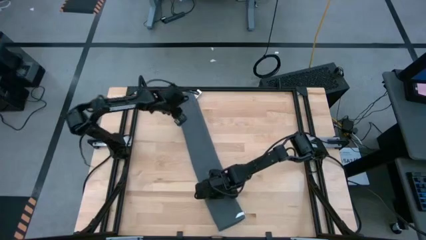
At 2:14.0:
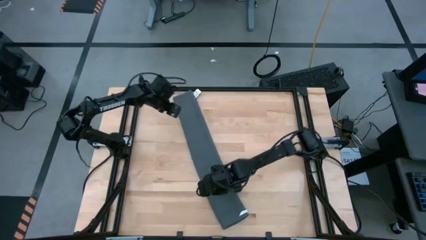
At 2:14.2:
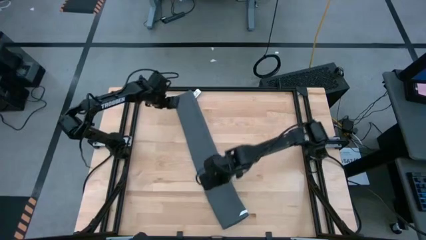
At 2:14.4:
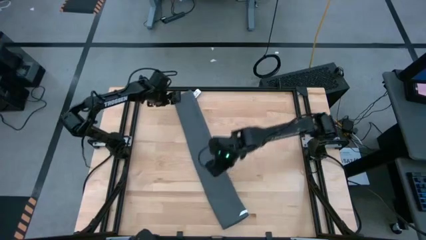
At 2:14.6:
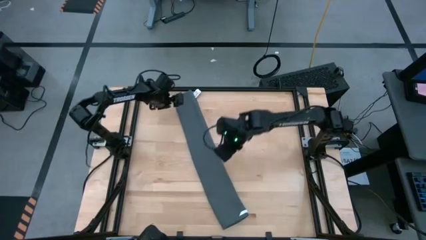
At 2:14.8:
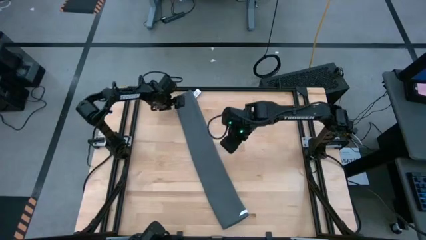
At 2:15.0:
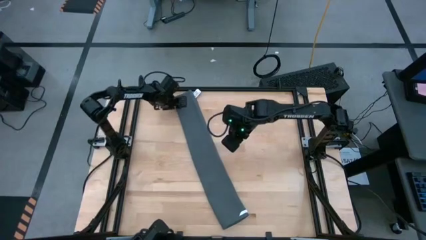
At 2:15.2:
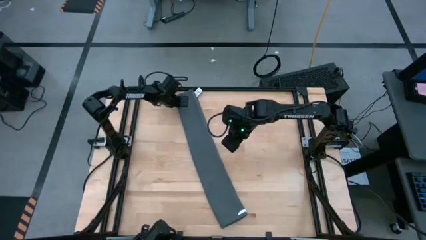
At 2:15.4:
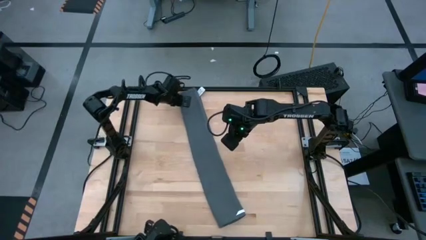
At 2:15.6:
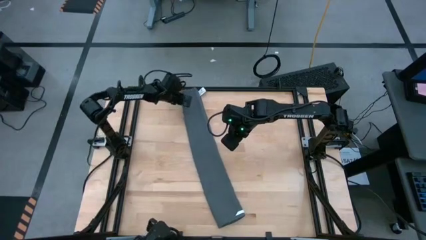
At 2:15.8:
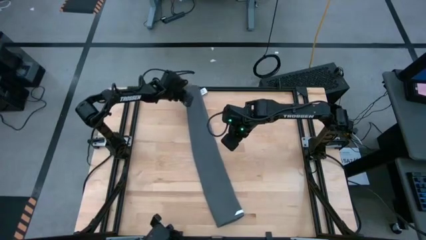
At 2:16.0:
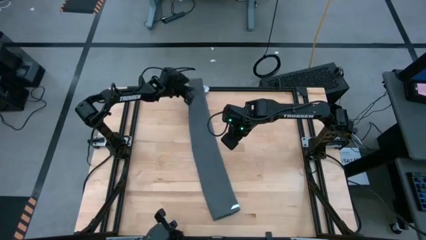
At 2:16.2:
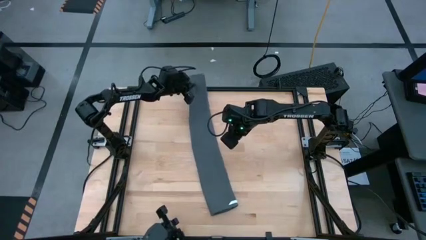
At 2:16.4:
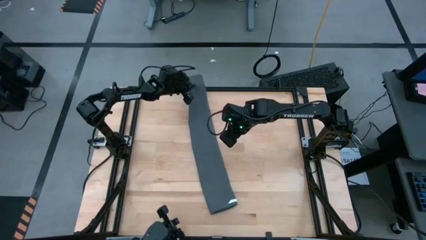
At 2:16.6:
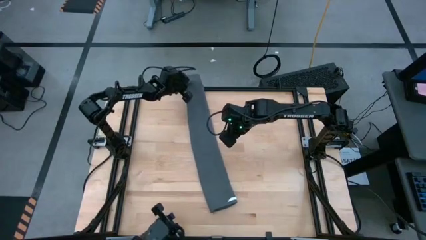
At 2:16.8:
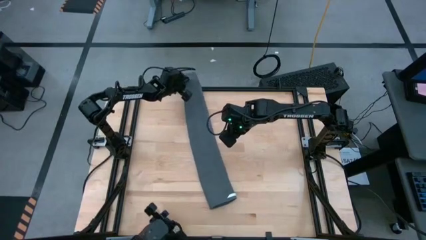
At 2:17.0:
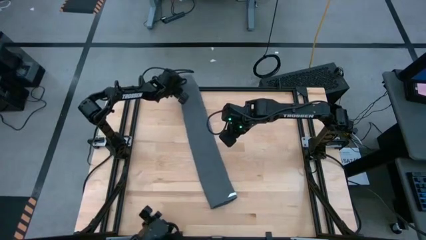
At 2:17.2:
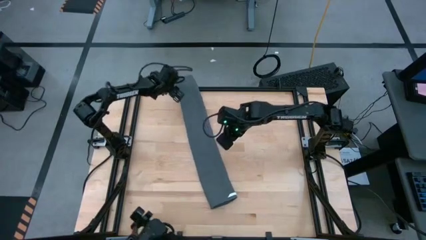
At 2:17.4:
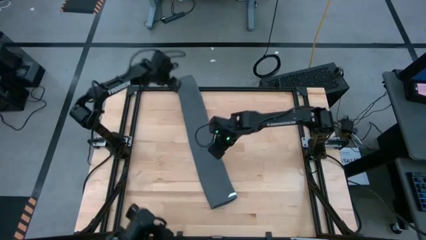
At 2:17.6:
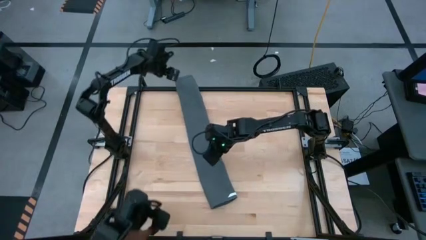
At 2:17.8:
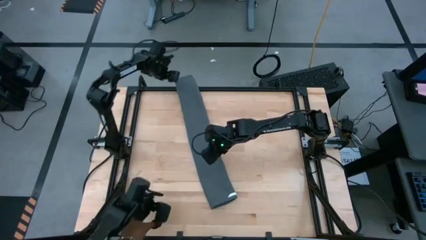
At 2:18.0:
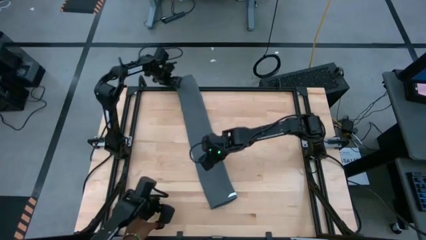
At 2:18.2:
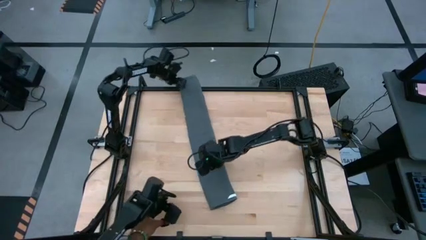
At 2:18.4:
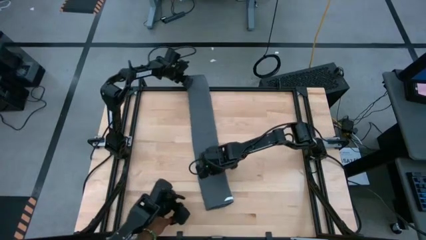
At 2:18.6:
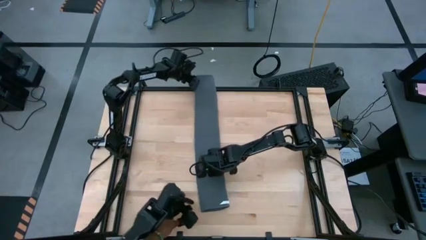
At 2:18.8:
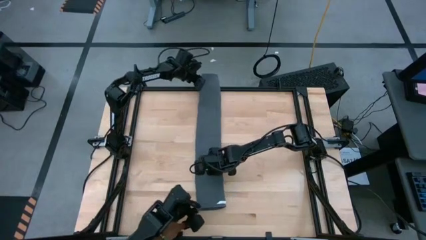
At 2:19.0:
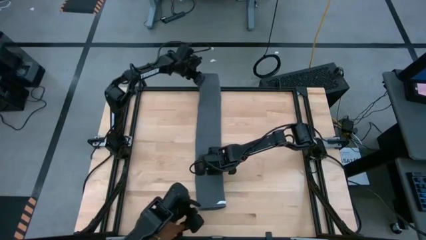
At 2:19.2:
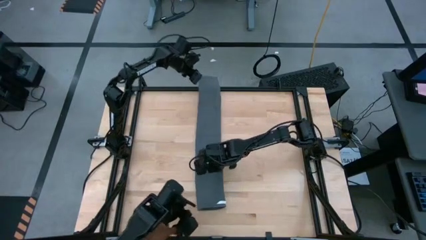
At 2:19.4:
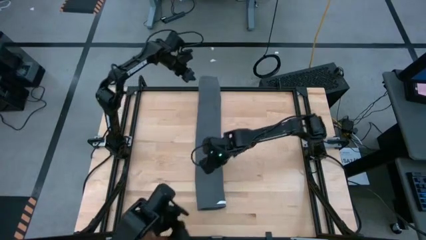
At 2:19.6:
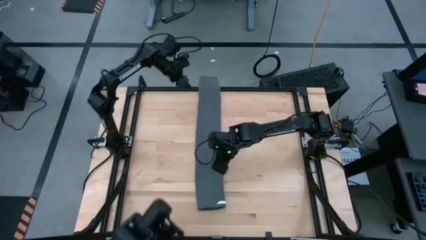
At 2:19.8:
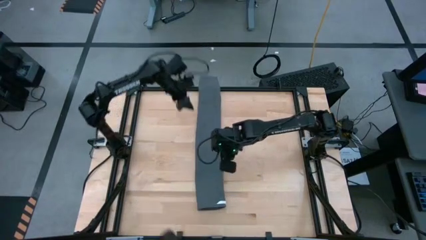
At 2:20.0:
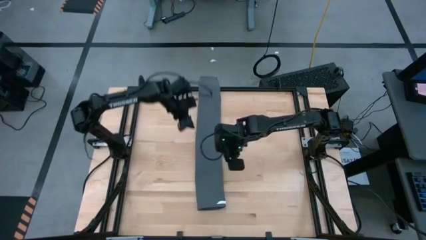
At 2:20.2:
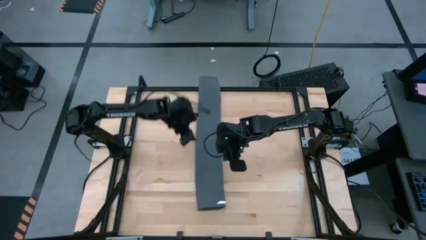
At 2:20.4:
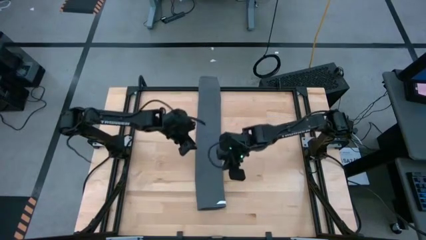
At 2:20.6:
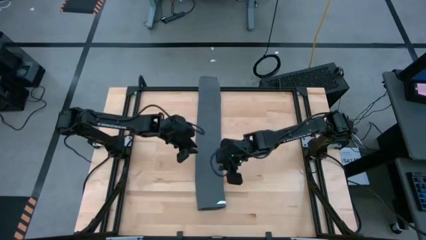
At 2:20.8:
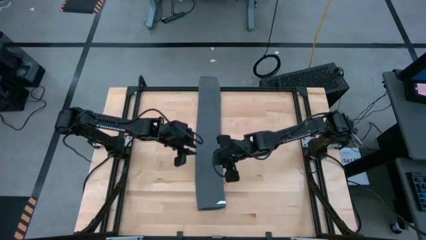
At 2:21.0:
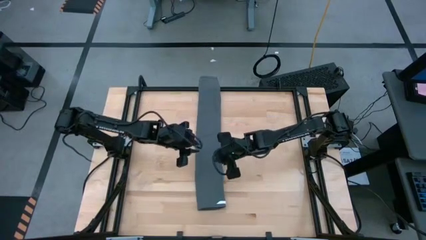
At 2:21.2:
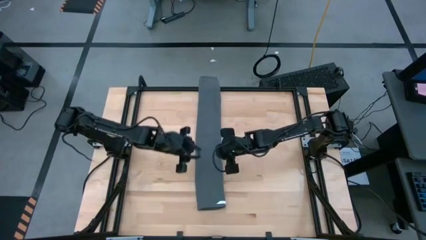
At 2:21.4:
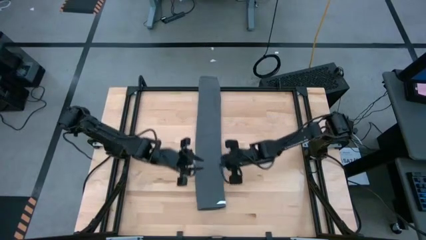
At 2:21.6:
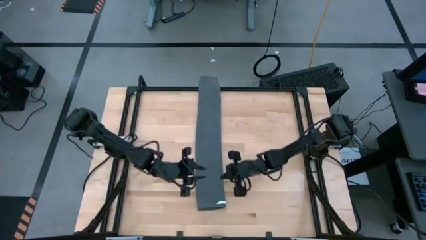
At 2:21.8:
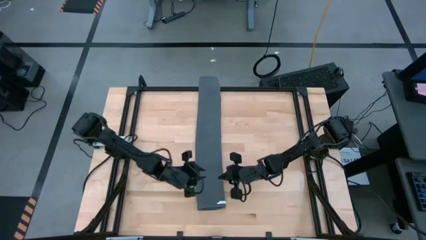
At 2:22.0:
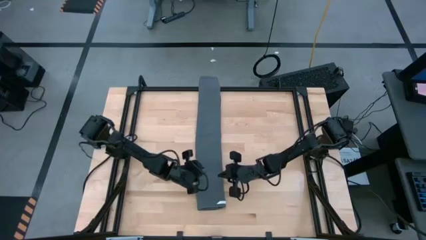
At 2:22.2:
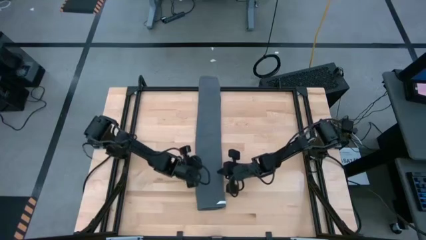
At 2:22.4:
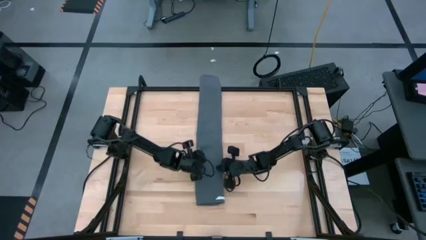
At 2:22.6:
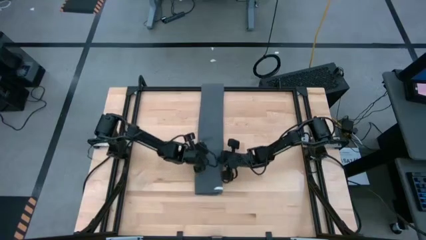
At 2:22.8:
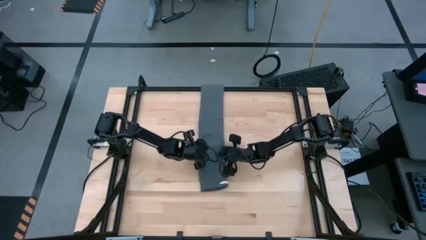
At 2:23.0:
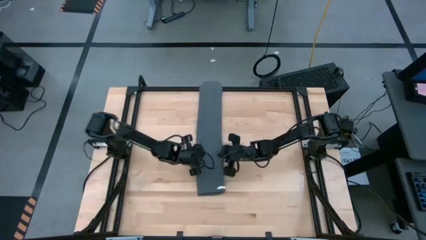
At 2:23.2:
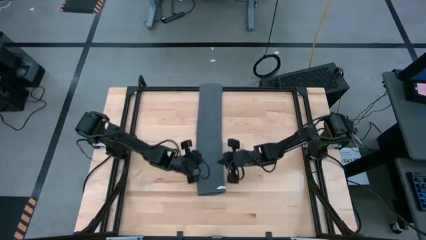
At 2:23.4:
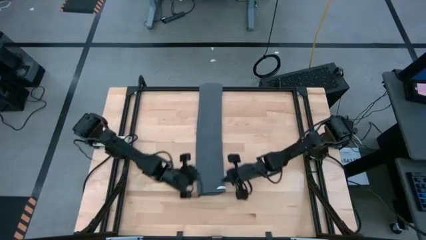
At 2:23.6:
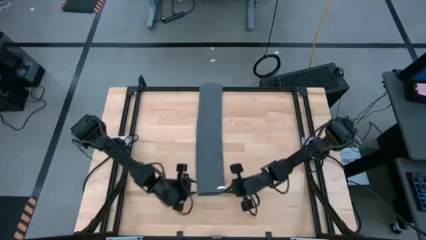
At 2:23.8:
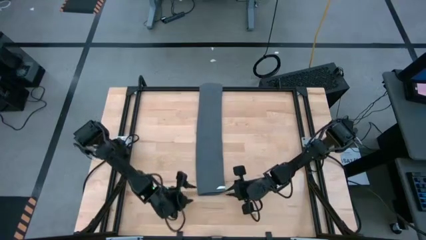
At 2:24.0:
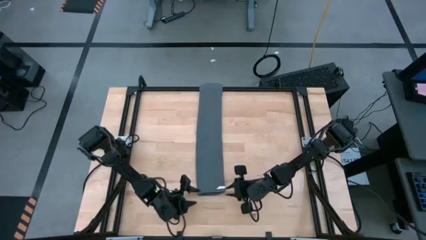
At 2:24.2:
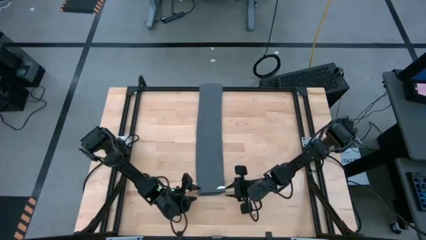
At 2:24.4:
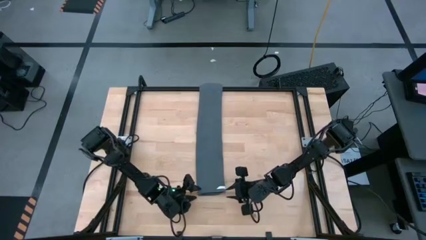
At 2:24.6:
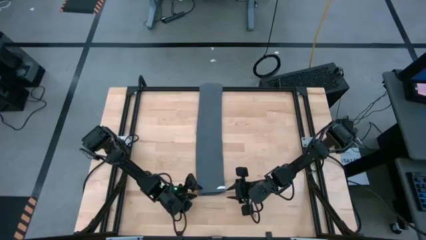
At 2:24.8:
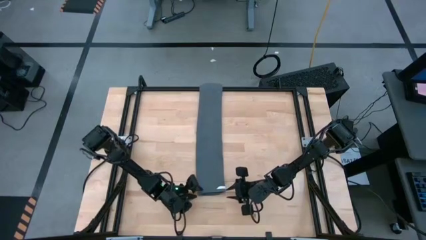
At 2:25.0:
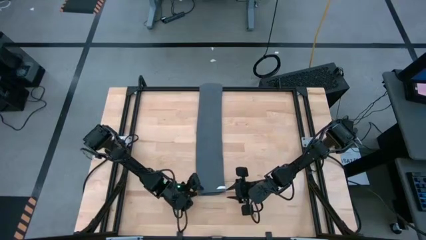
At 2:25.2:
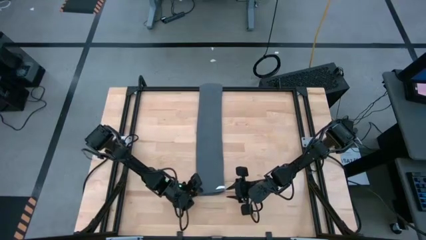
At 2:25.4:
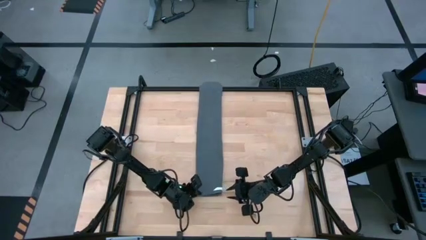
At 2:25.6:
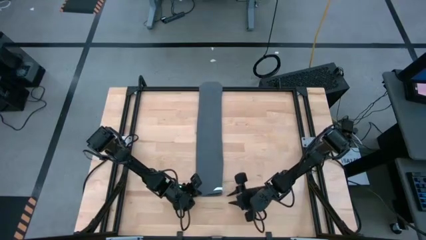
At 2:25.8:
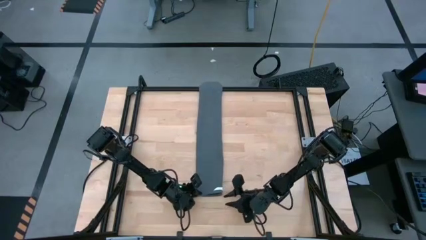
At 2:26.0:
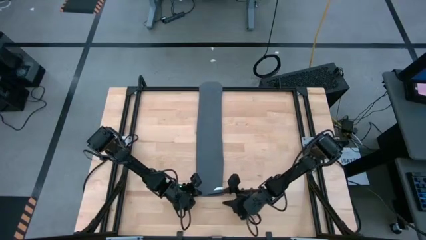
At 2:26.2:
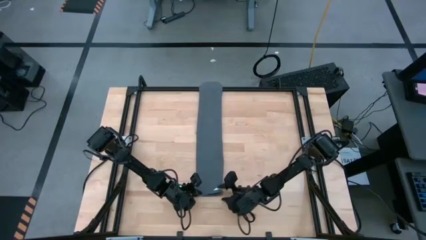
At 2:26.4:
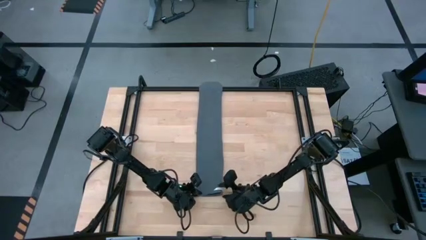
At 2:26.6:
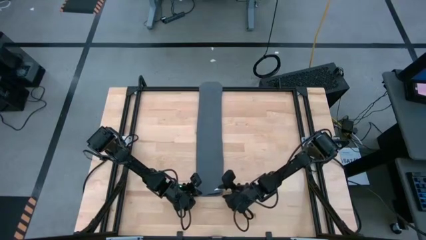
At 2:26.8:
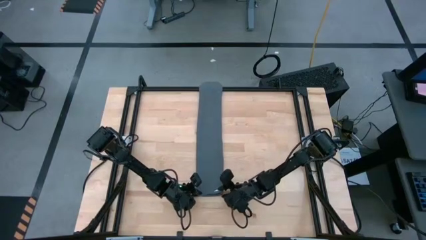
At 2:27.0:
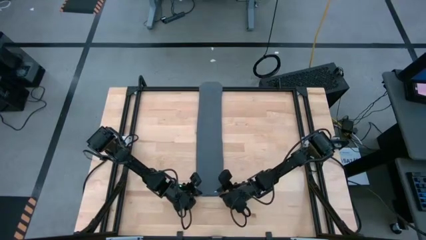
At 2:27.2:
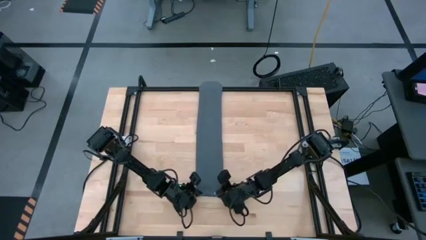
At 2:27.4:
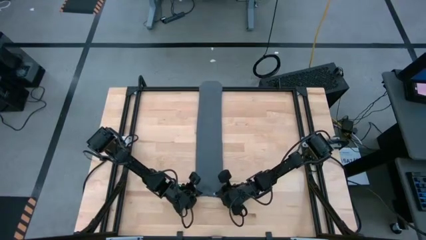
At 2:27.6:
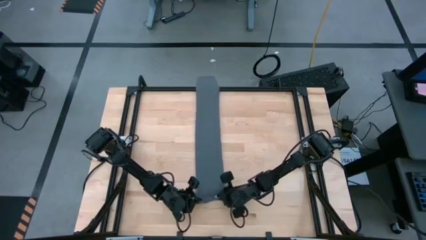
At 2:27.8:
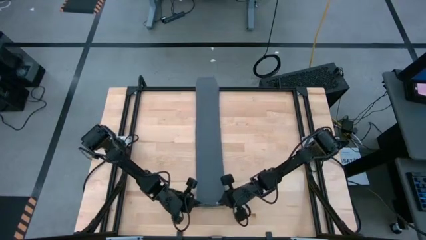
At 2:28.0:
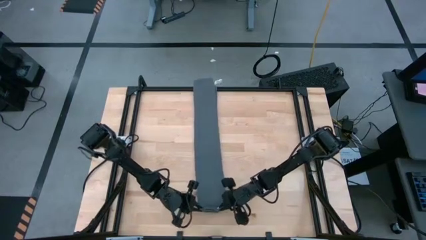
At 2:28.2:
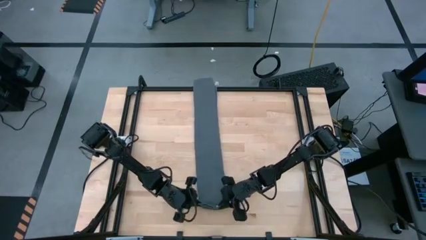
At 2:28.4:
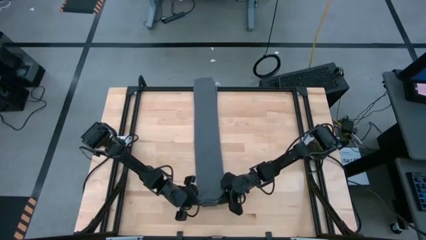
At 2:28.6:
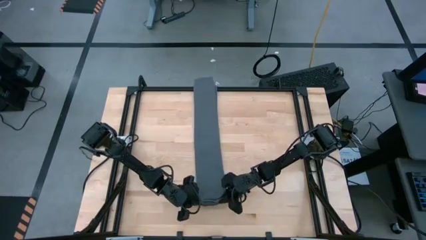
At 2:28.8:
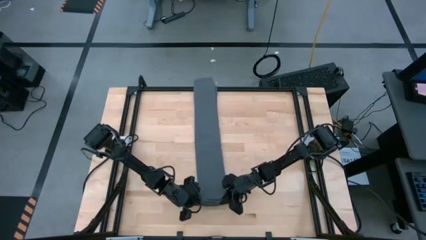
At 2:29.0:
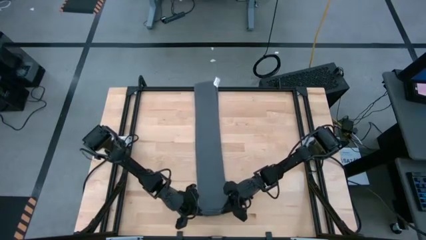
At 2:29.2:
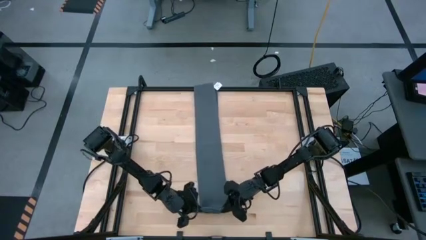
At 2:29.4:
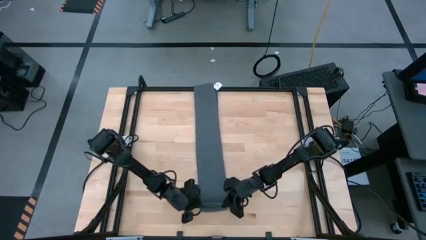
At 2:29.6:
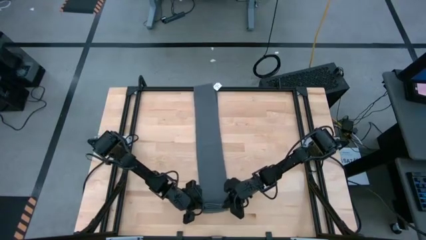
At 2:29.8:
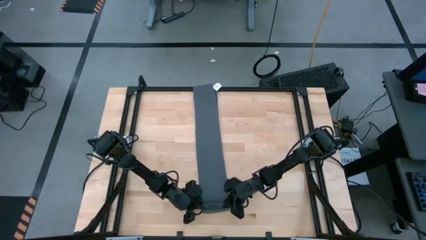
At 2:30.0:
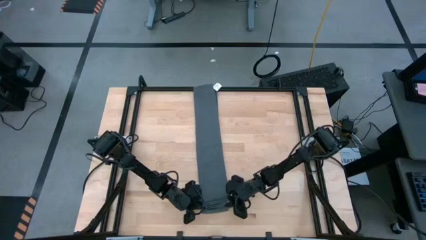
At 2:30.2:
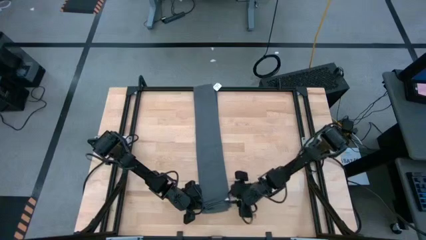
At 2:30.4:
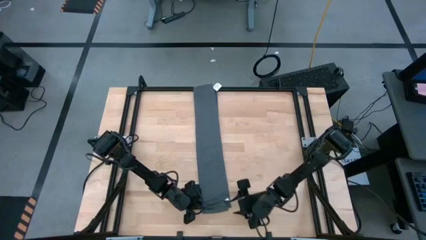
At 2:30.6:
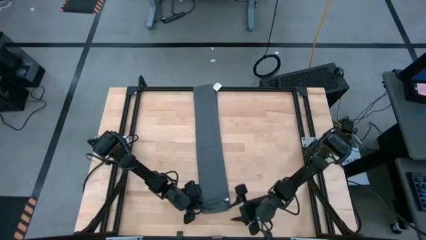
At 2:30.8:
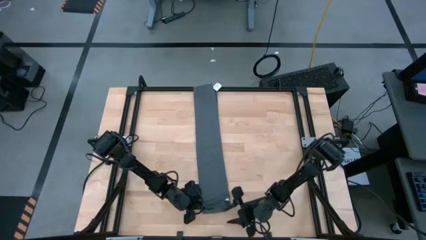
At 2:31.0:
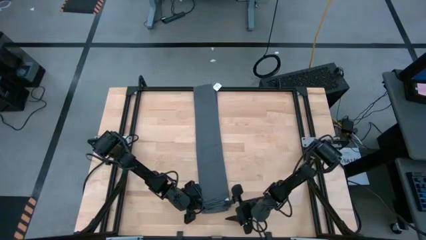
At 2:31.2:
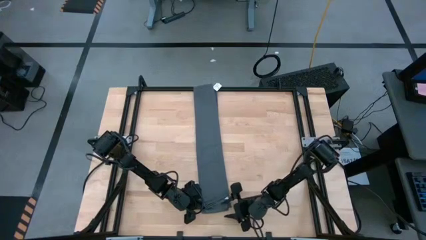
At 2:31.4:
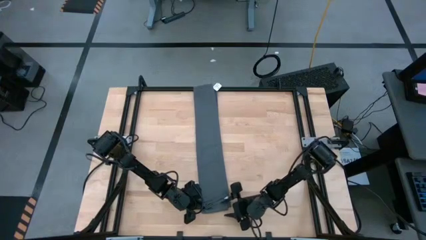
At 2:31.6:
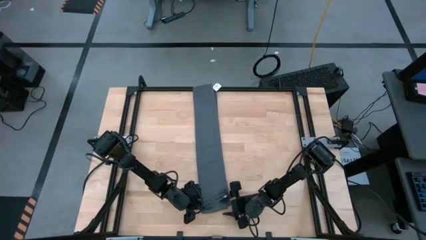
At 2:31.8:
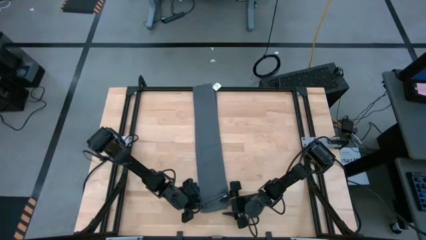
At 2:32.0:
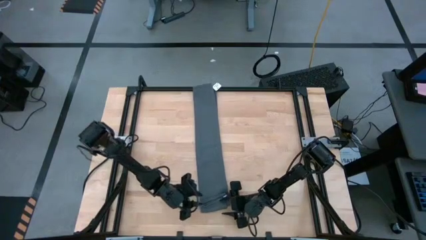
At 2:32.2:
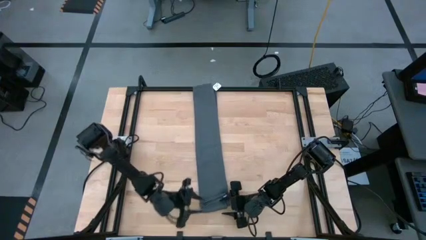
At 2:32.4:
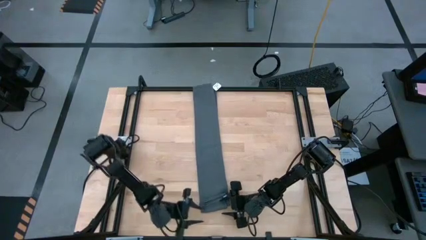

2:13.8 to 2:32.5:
Task: Roll towel into tight, uniform cylinder
Roll the towel
